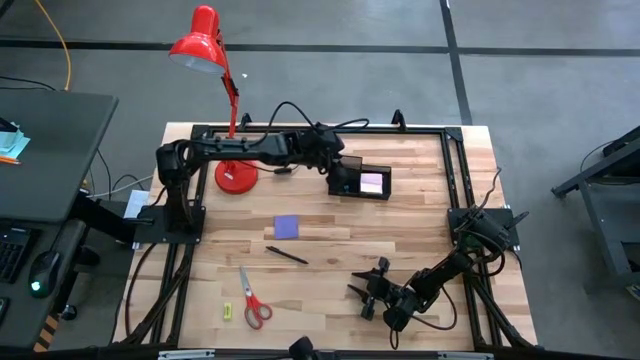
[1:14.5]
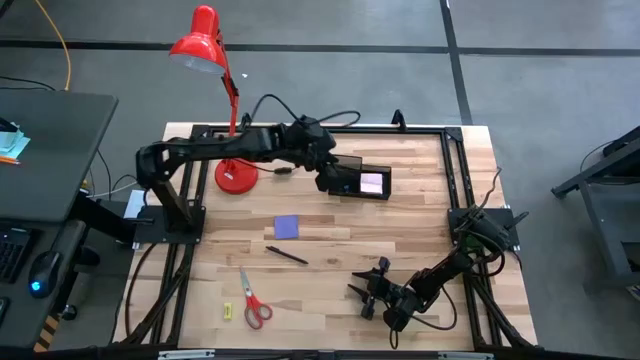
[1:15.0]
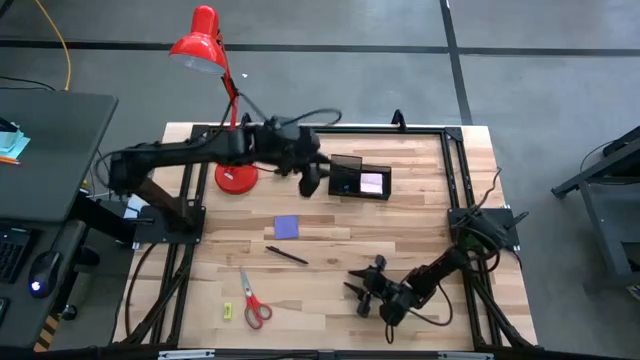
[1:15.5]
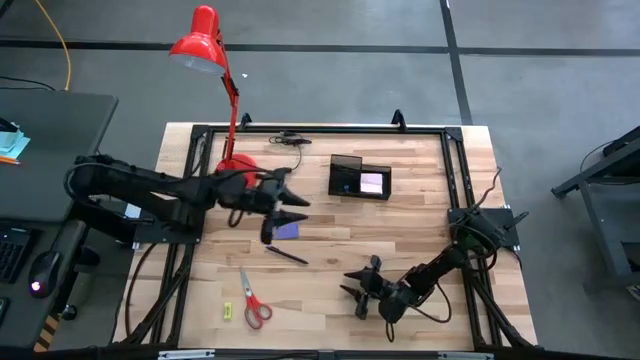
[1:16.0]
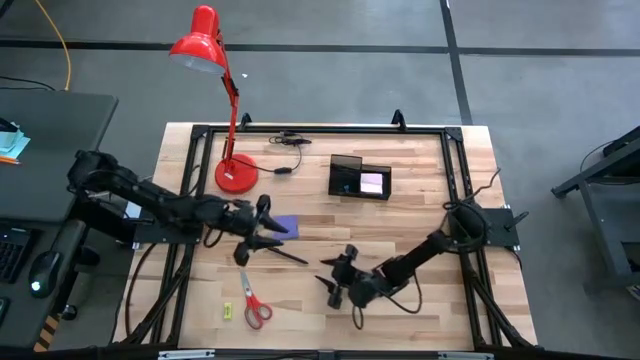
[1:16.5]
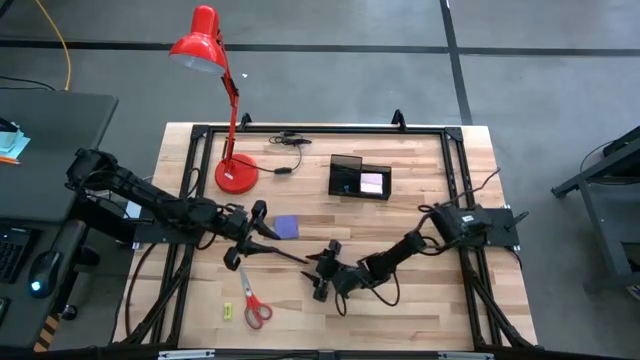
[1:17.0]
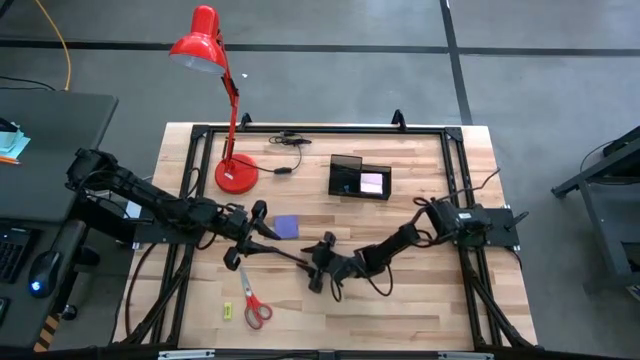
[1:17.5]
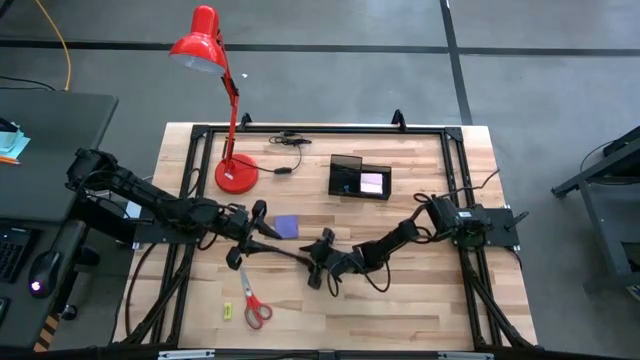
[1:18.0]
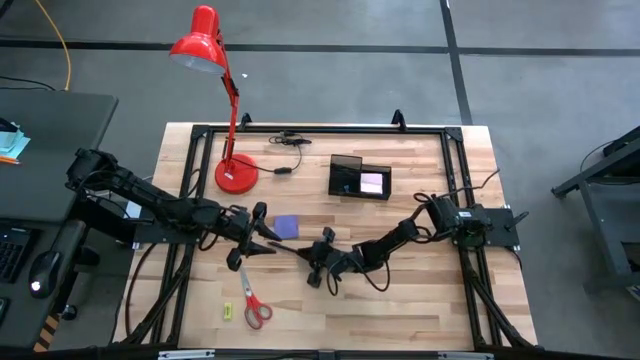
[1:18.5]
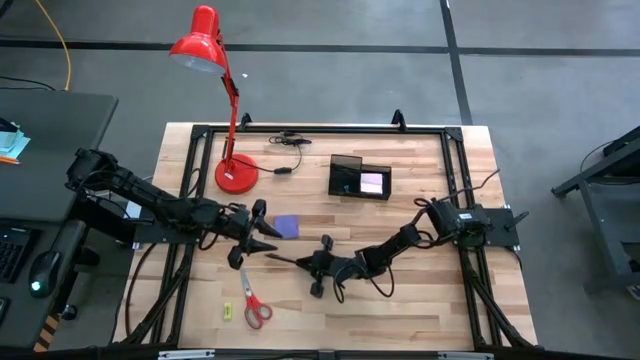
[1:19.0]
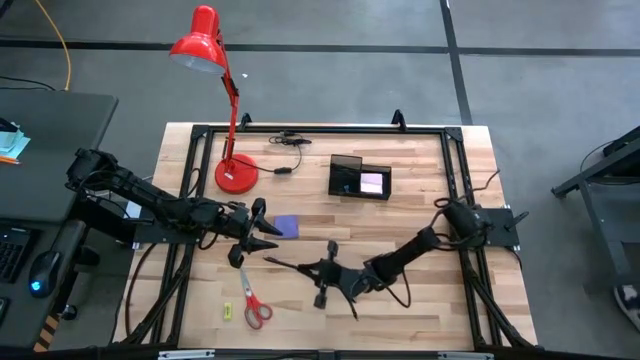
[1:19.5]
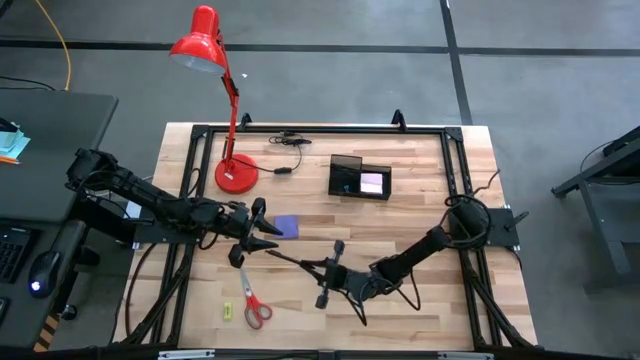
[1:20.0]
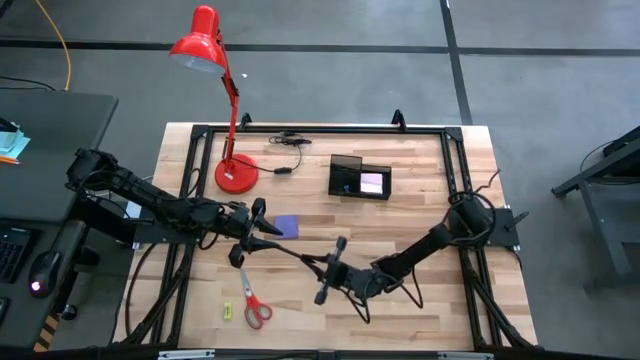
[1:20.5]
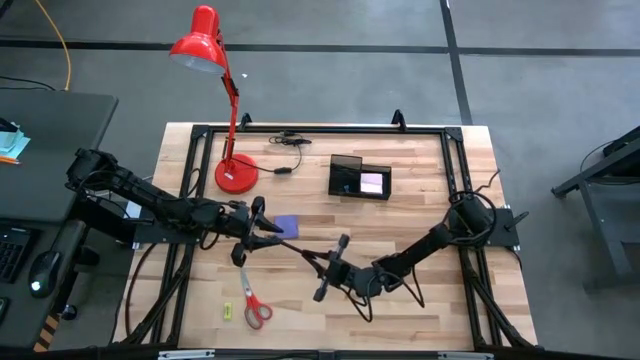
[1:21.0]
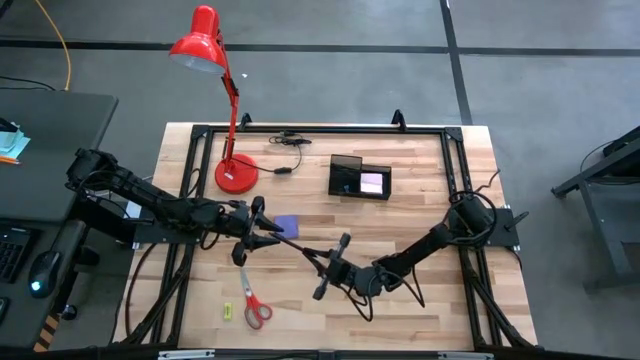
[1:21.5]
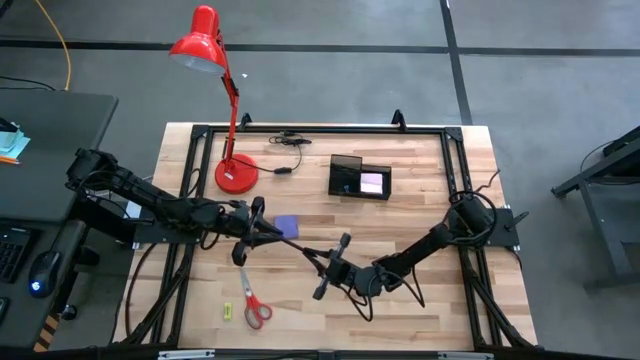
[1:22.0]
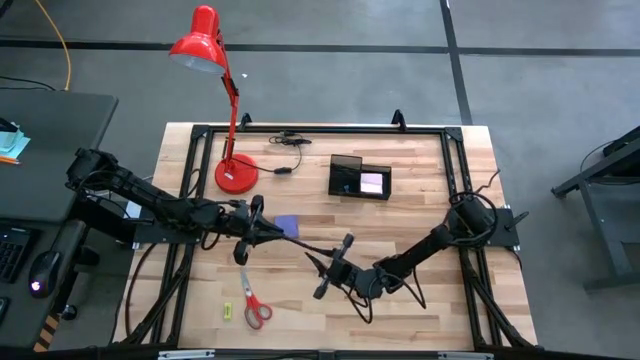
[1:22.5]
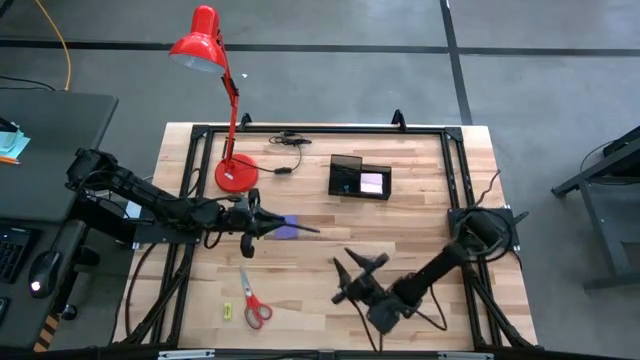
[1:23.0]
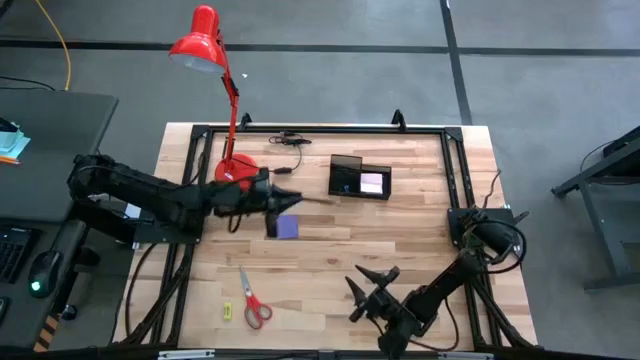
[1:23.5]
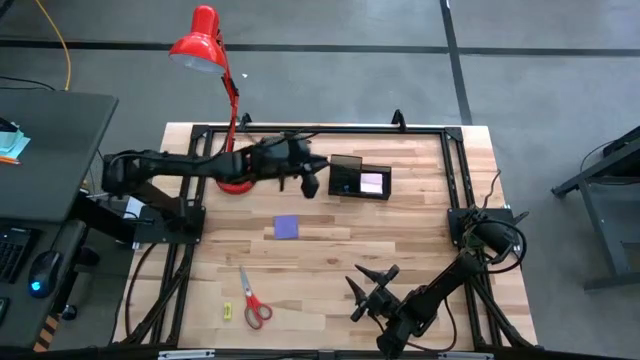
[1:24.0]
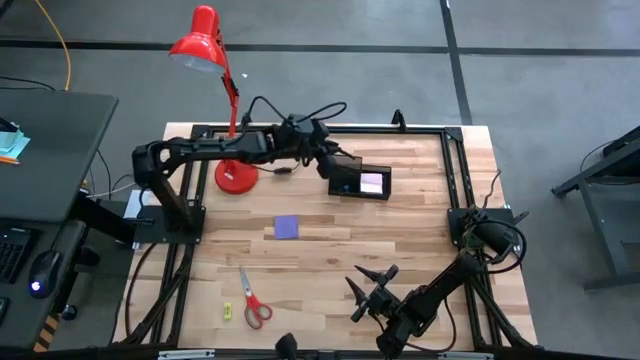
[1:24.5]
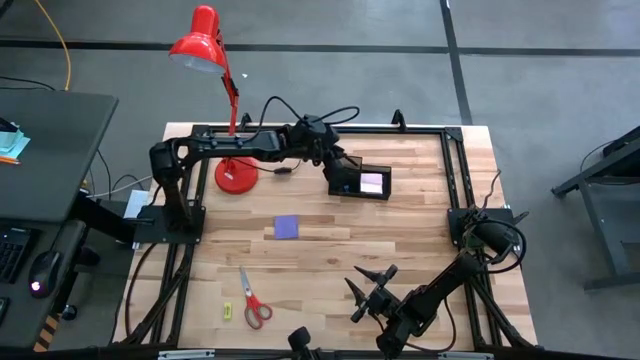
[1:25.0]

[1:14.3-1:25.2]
Task: Pick and place office supplies into organizer
Put the black pen into the black desk organizer

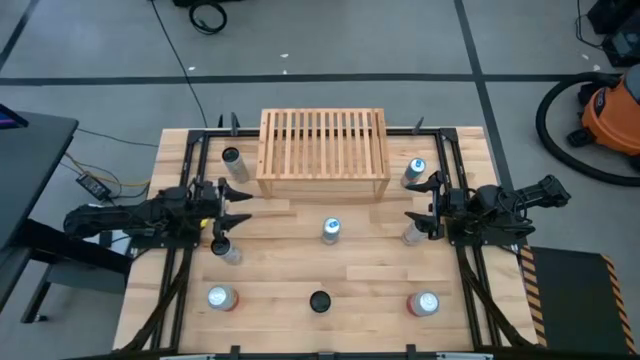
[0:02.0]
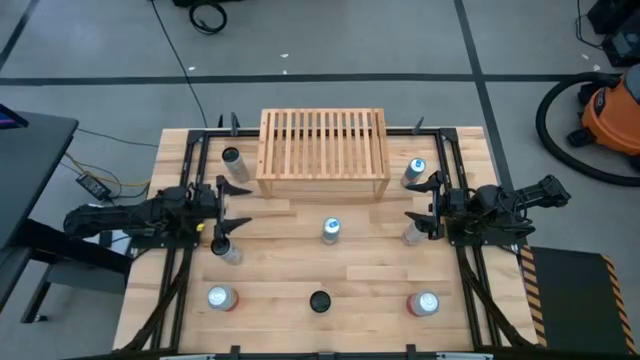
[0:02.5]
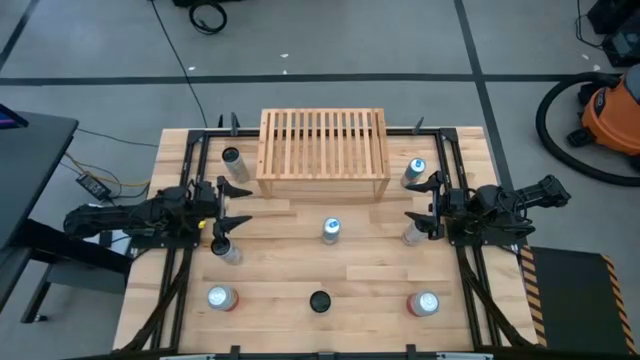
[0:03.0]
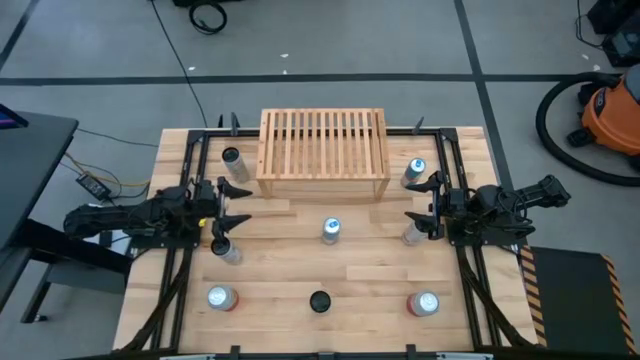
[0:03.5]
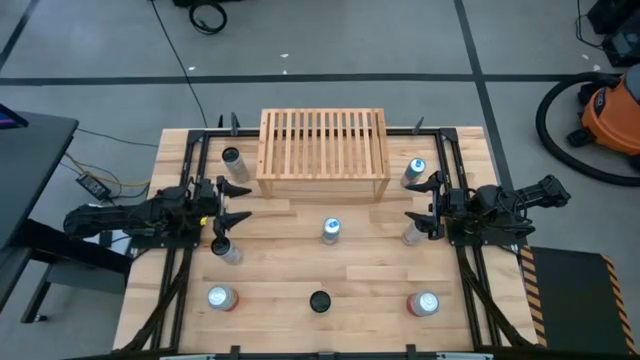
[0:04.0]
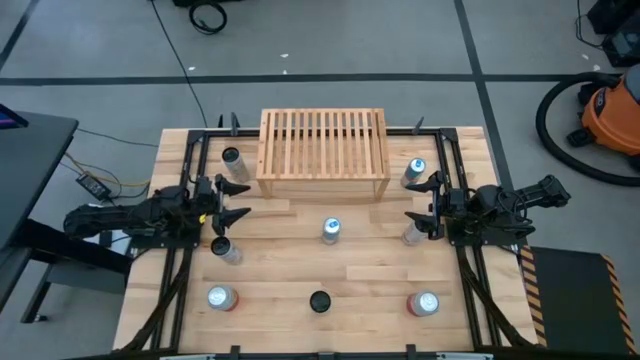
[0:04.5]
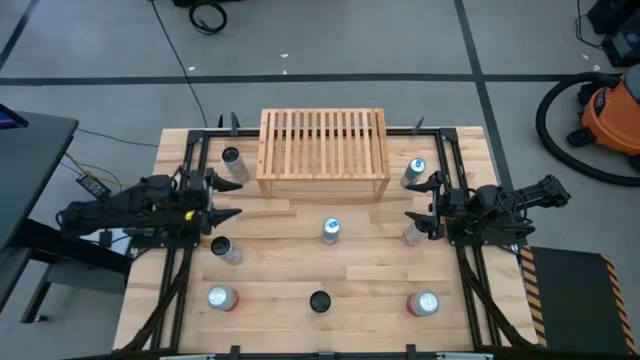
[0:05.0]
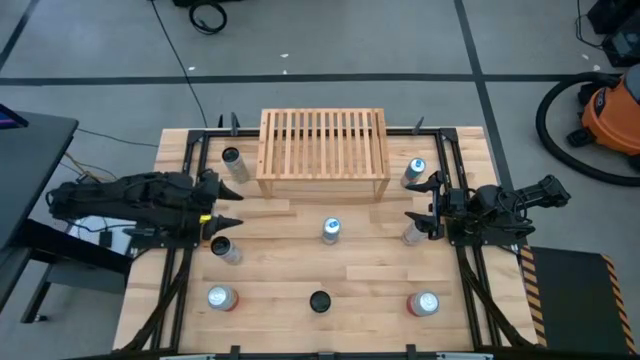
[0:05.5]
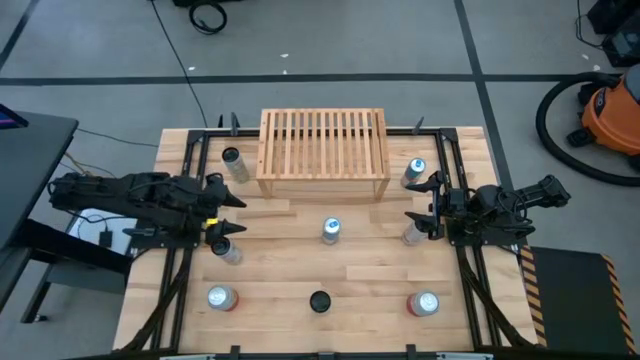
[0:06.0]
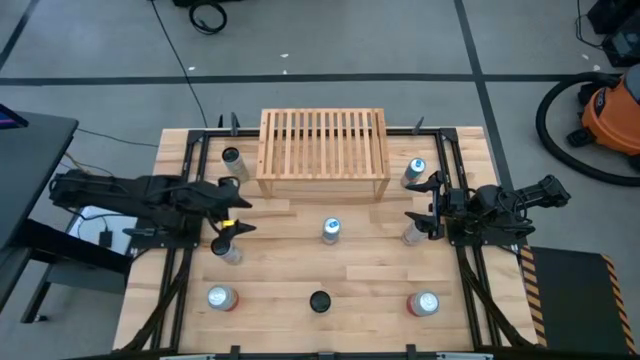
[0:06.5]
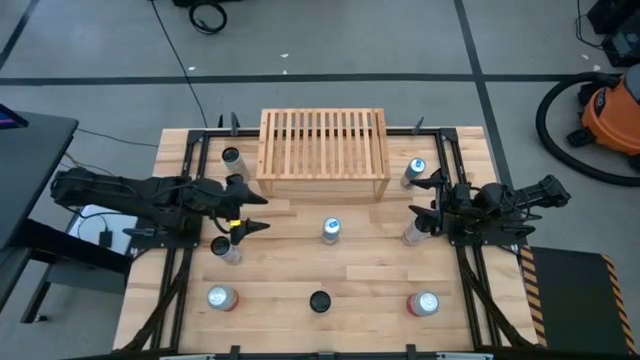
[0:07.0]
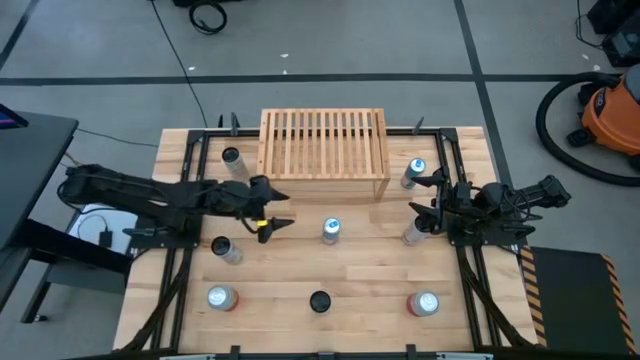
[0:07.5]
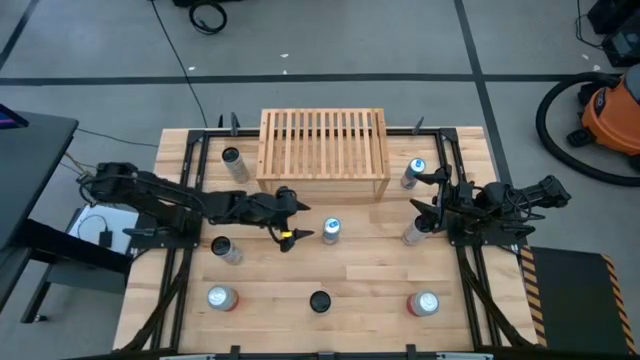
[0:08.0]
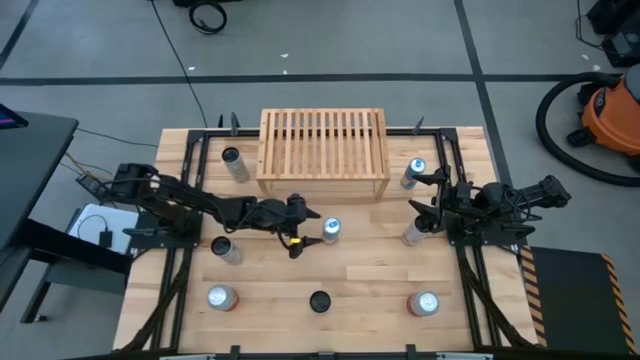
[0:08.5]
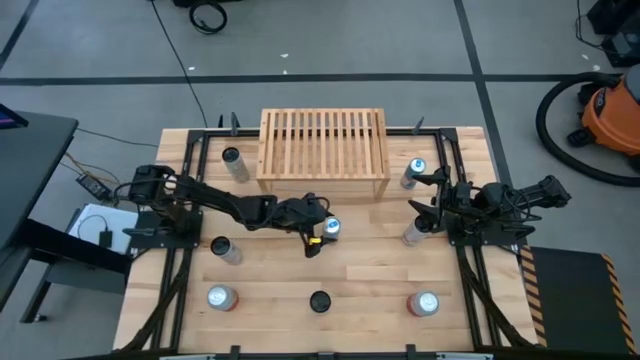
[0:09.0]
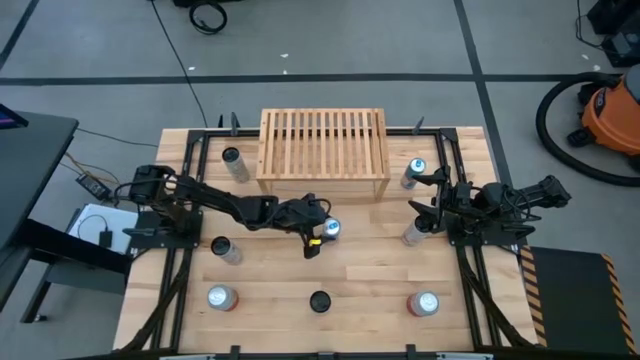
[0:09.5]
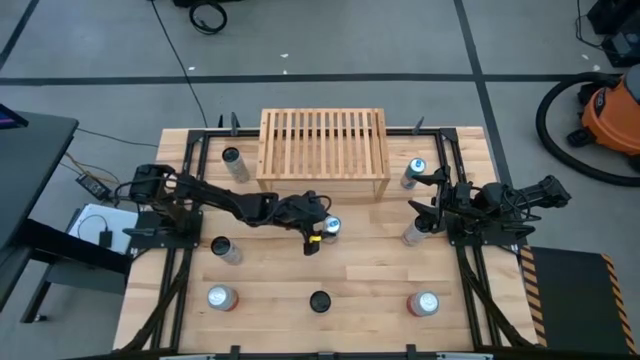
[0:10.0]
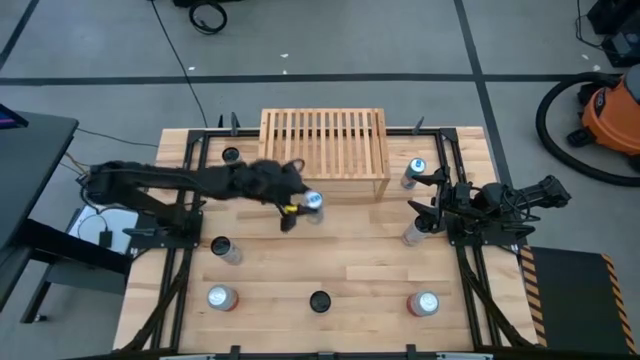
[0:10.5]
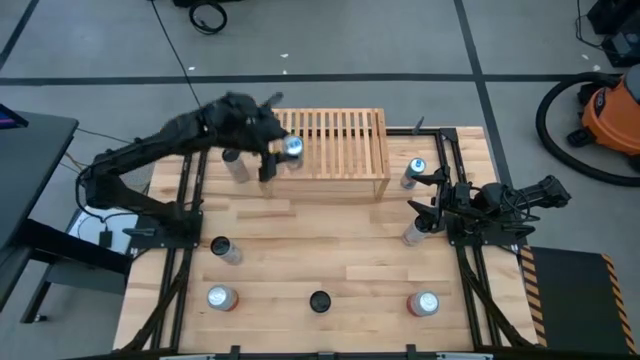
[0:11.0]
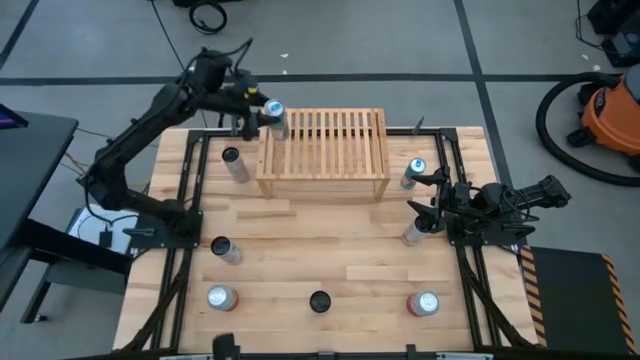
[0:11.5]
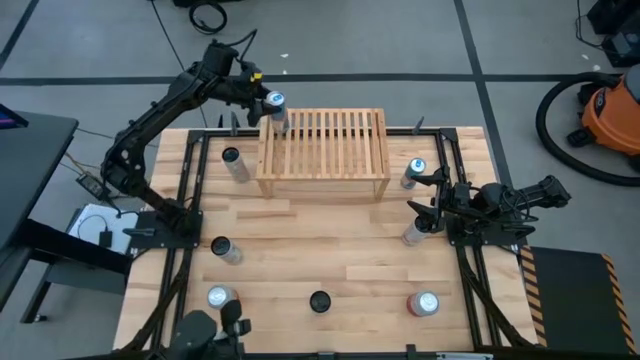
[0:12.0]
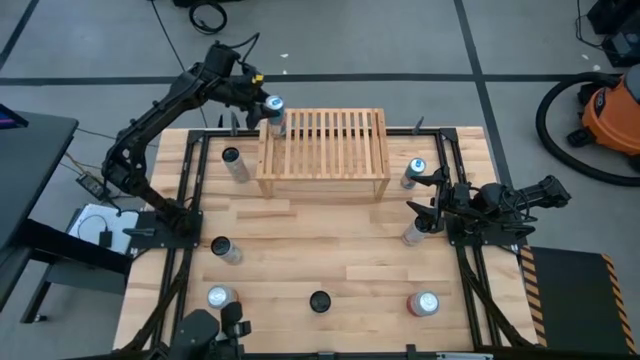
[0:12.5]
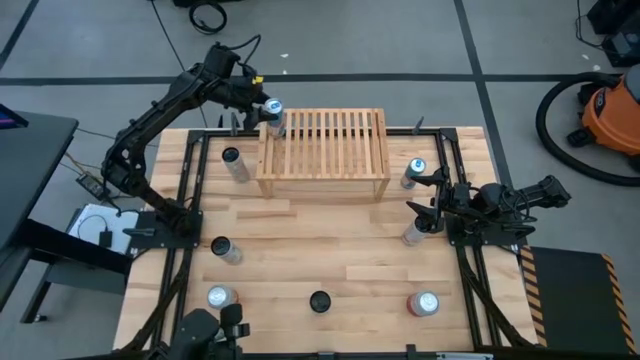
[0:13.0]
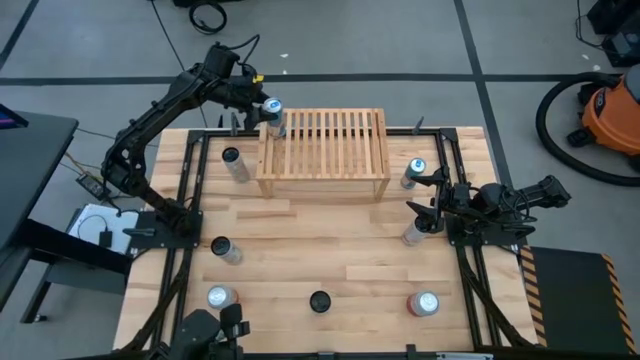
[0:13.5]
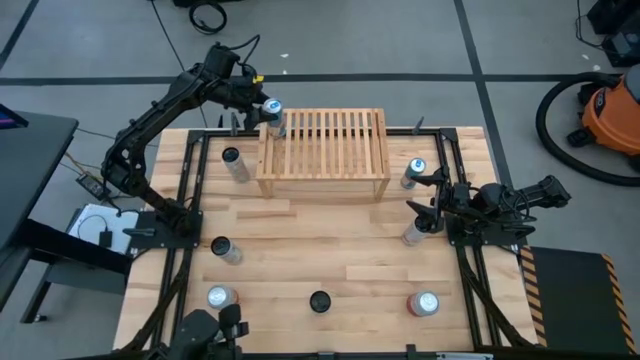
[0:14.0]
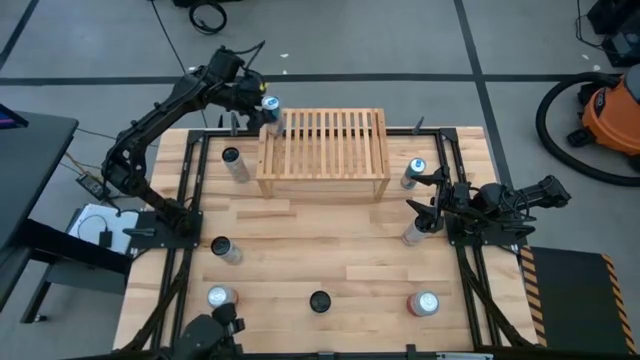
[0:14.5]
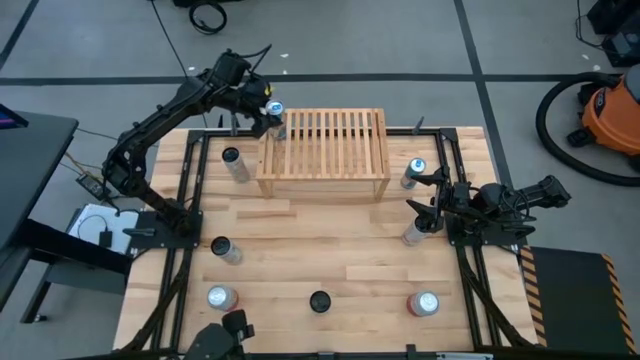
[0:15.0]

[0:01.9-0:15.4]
Task: Place canned beverage on shelf
Put the bottom blue soda can on the shelf
